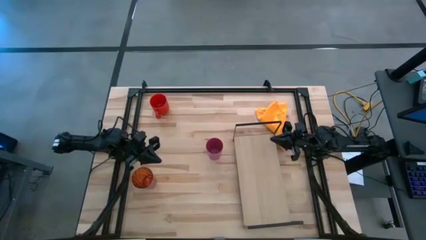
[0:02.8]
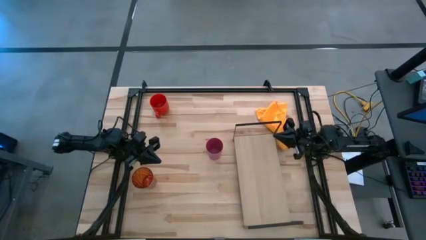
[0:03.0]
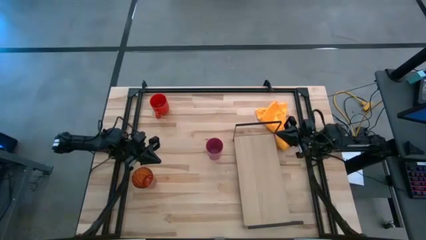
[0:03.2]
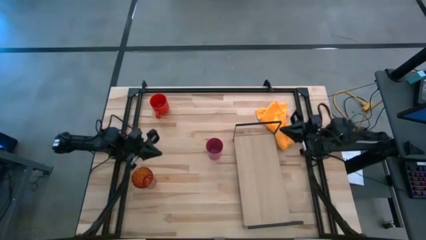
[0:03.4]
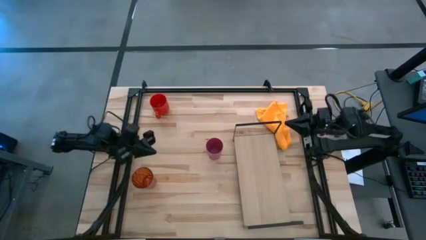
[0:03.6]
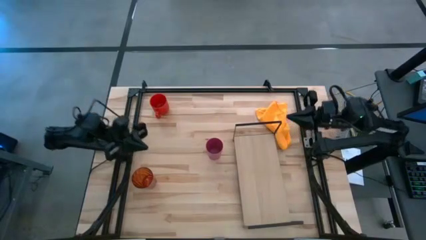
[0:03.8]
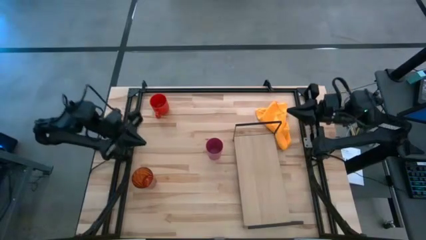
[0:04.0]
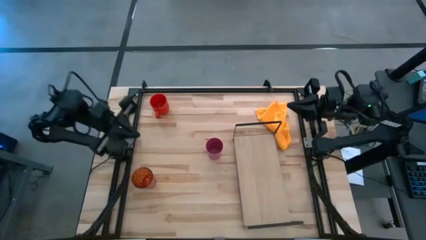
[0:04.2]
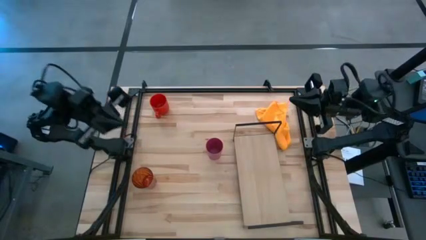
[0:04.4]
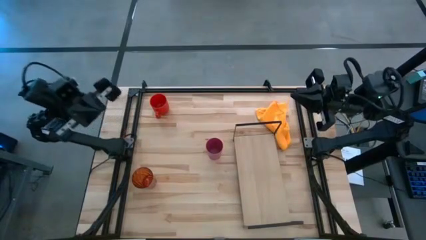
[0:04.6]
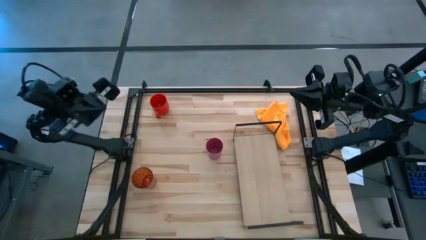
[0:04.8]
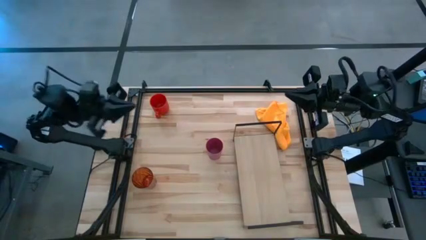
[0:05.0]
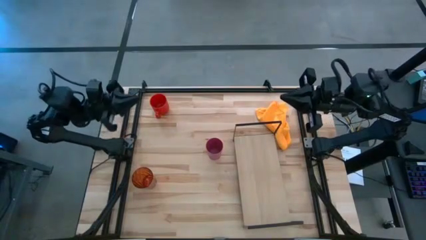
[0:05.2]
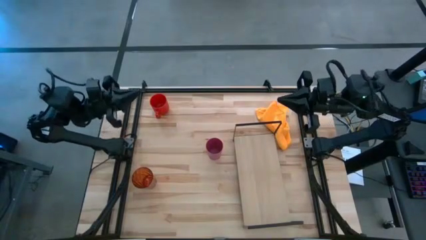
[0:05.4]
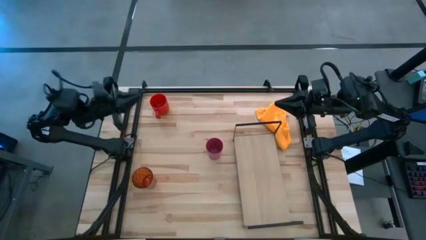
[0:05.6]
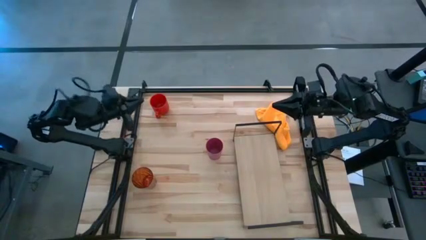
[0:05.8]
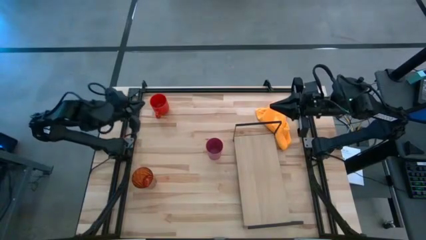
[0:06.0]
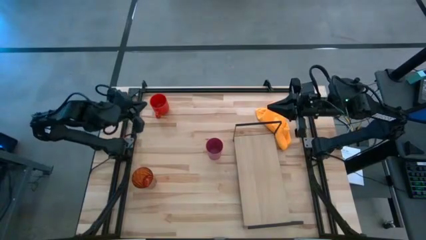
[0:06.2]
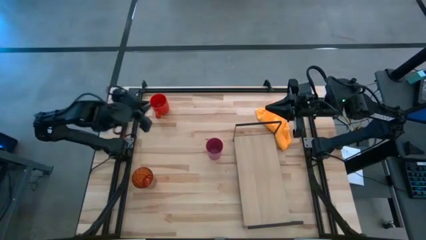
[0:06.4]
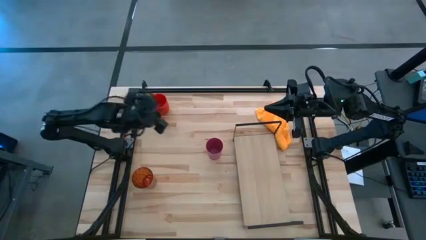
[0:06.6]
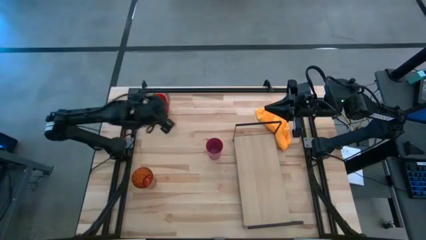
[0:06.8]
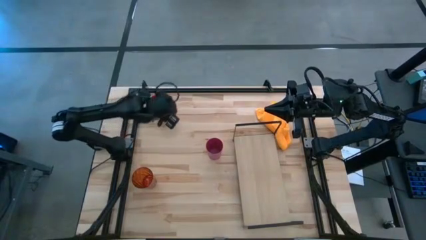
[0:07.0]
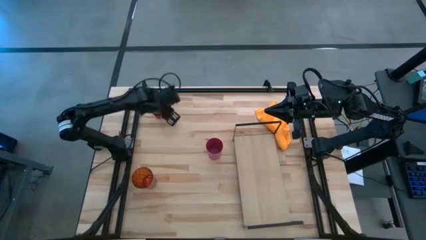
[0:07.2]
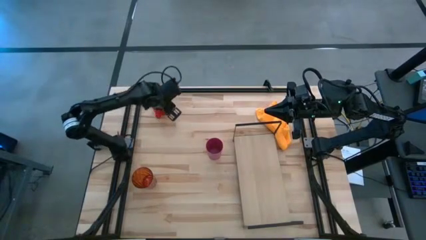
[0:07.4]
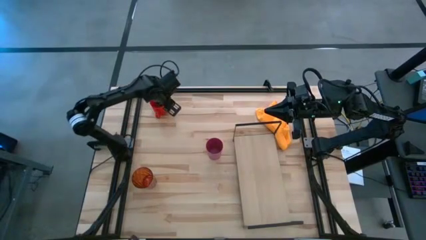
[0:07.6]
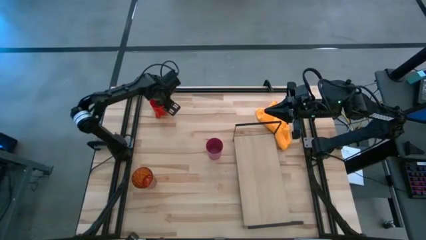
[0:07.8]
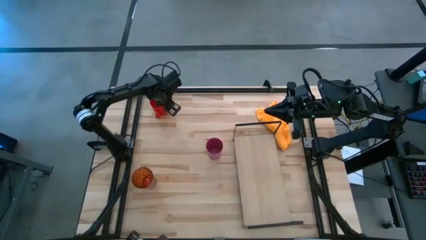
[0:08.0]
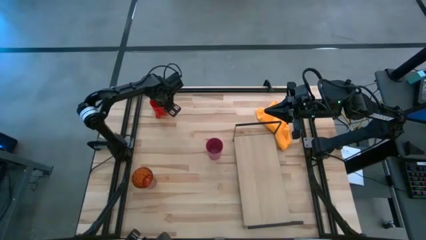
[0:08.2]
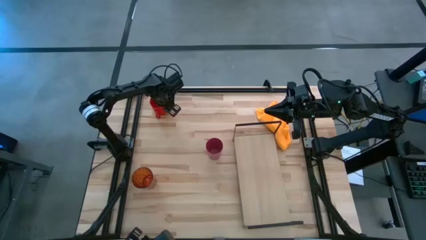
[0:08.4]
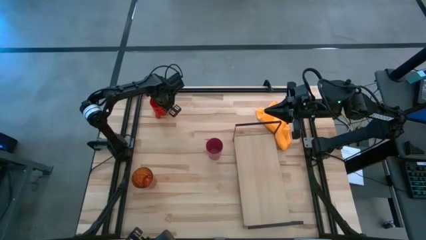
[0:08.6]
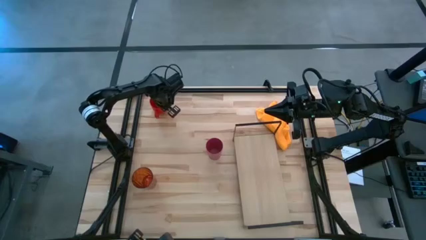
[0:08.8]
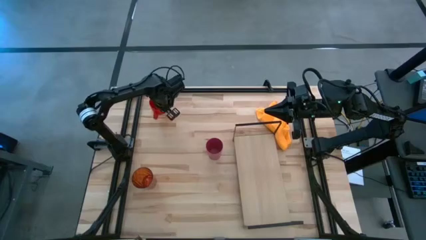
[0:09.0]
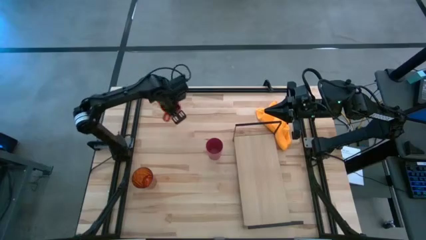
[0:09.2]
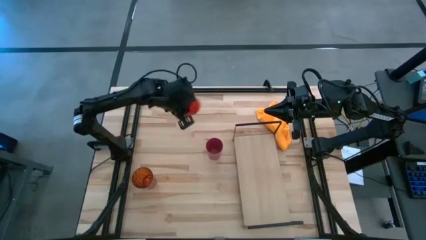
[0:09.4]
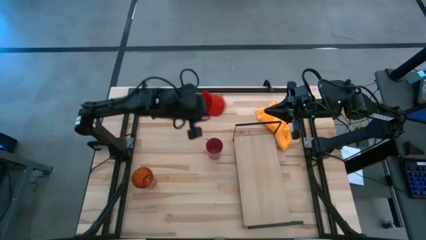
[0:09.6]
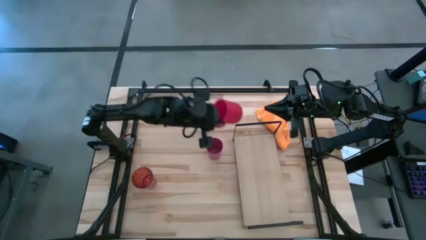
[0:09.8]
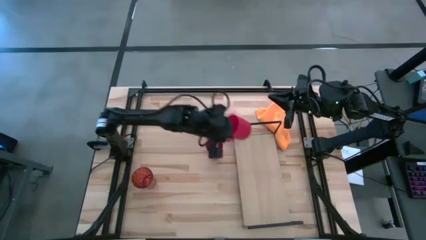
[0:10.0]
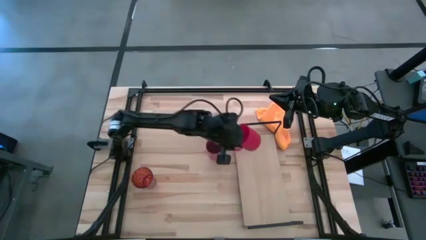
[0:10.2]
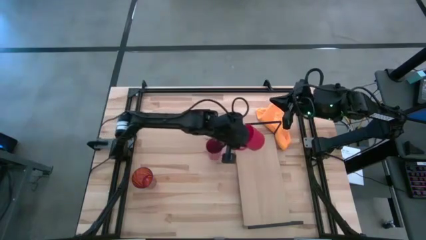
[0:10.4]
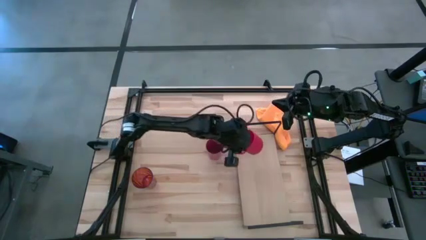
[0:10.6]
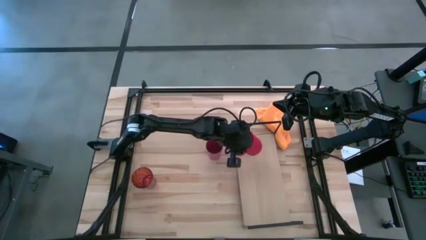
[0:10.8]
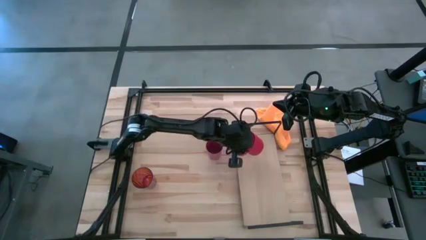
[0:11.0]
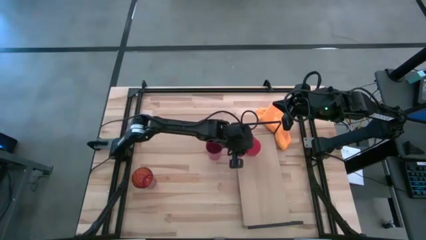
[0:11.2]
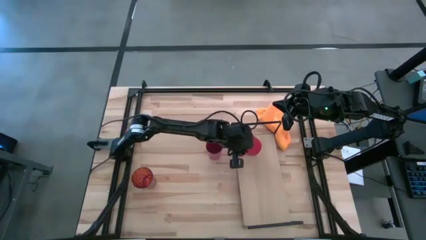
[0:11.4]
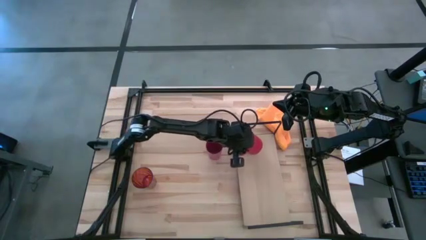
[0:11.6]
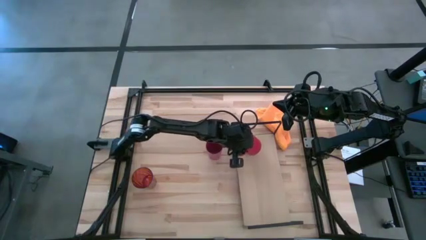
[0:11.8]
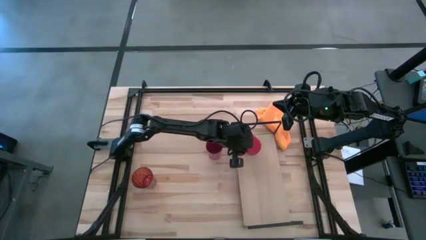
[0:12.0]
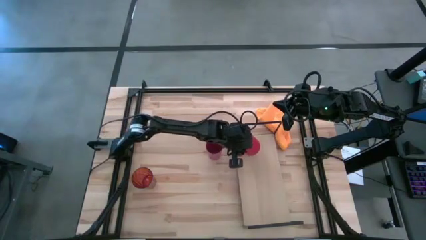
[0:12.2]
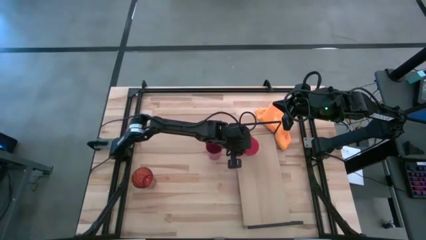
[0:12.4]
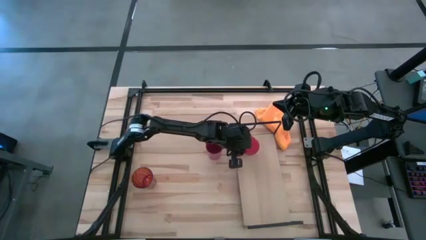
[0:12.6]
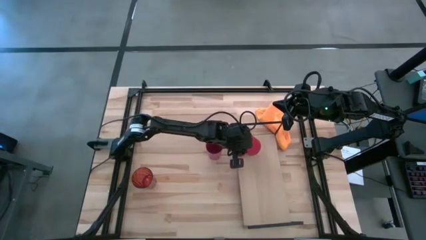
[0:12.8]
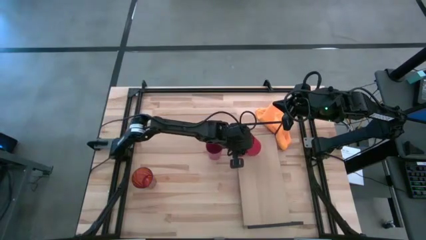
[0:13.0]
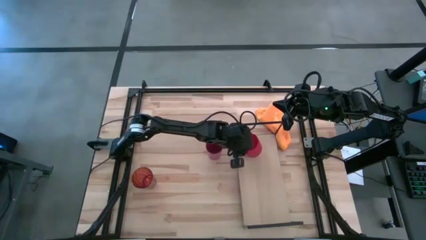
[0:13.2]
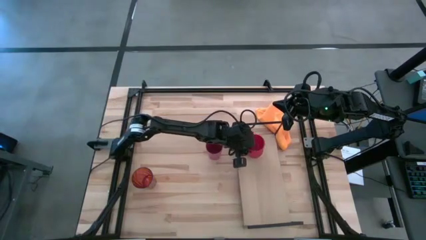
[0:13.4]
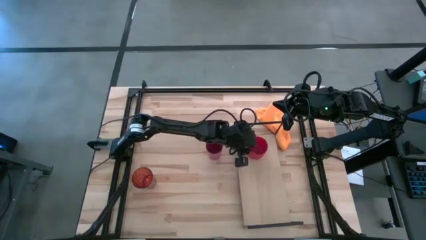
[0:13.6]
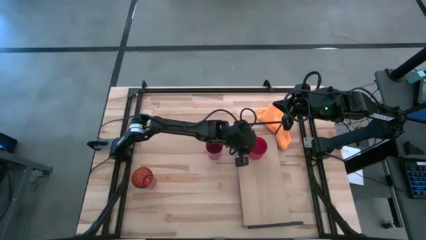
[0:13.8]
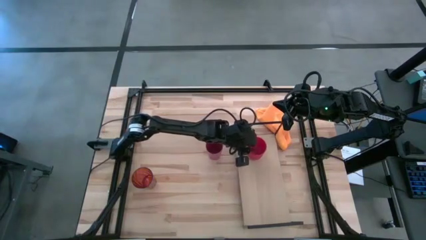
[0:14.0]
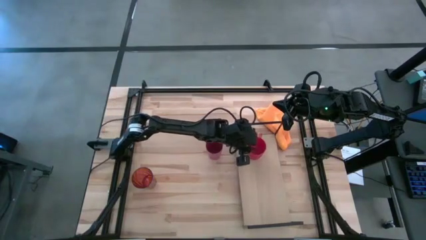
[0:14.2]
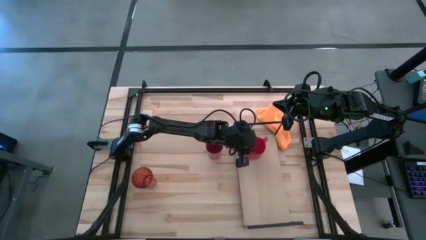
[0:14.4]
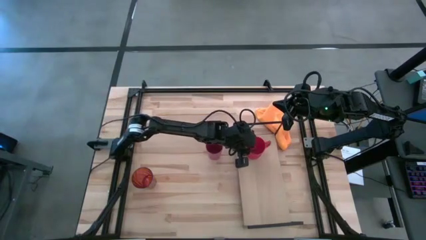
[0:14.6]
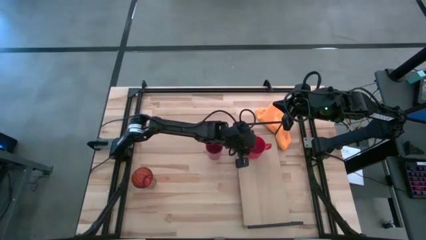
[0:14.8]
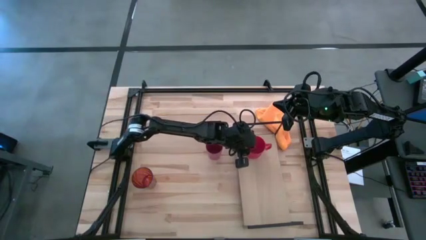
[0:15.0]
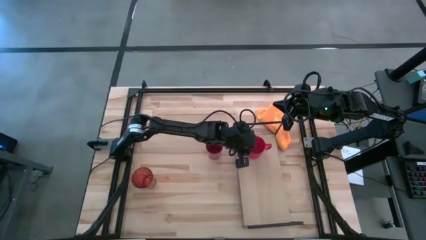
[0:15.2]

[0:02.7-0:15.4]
Task: Stack small to large cups/mugs on shelf
Put the red mug on the shelf
